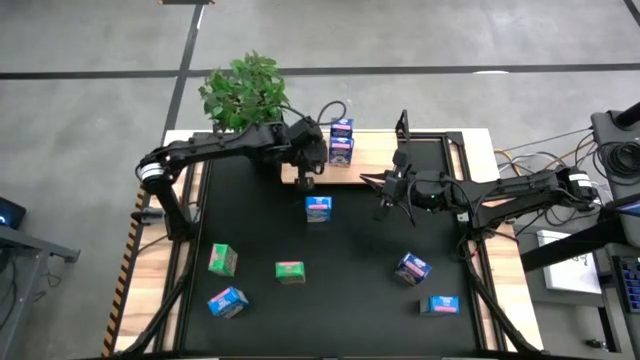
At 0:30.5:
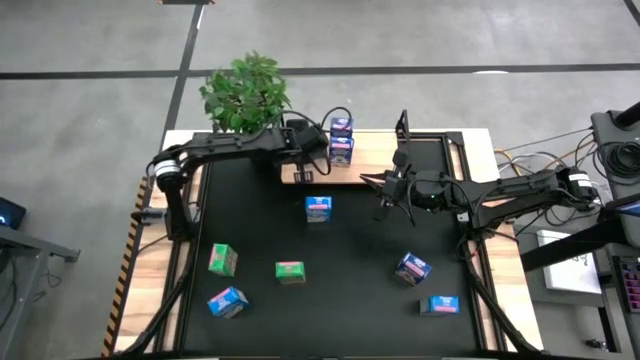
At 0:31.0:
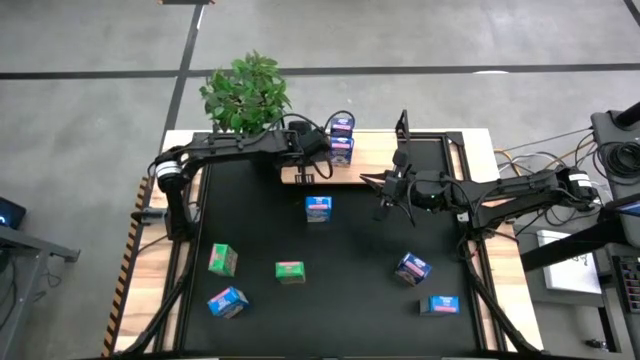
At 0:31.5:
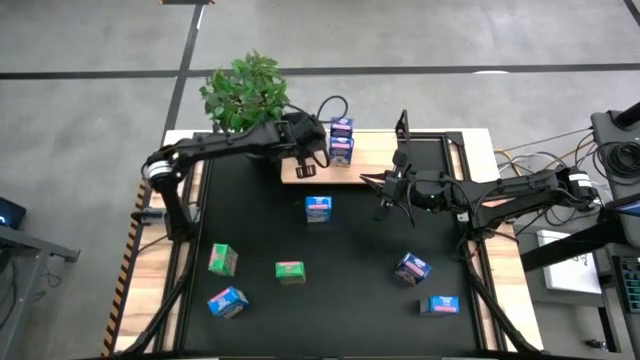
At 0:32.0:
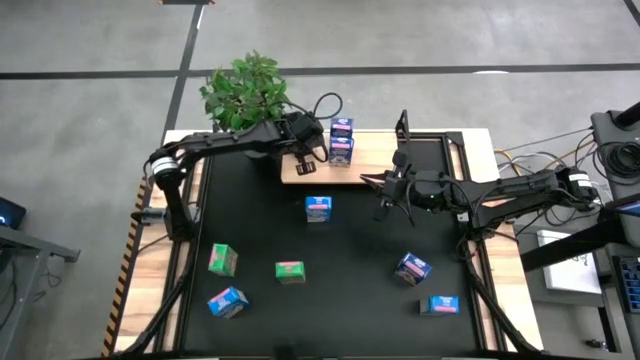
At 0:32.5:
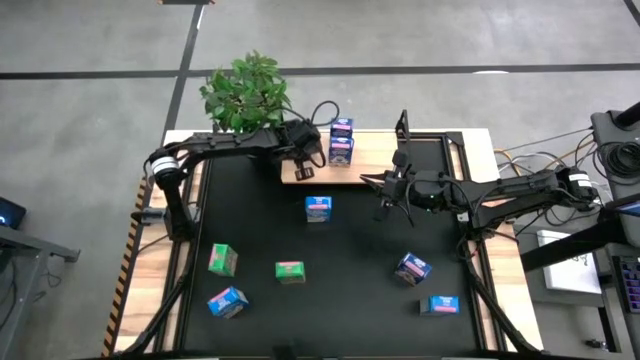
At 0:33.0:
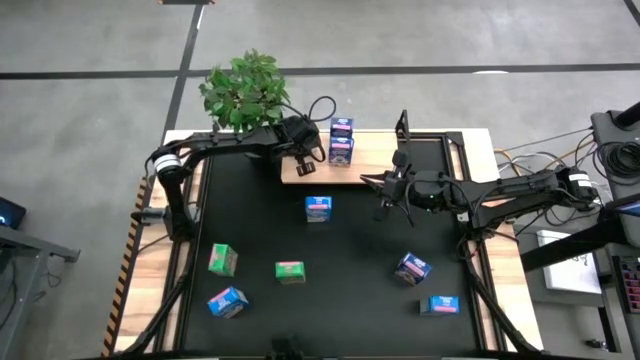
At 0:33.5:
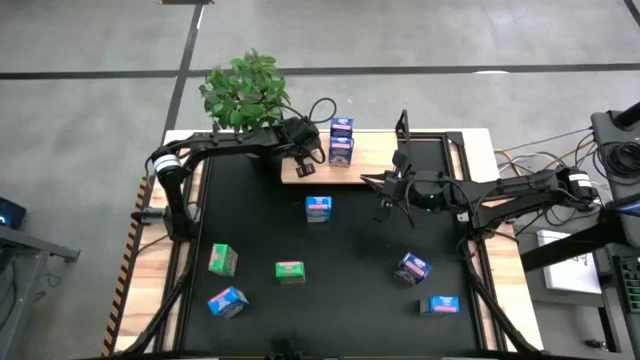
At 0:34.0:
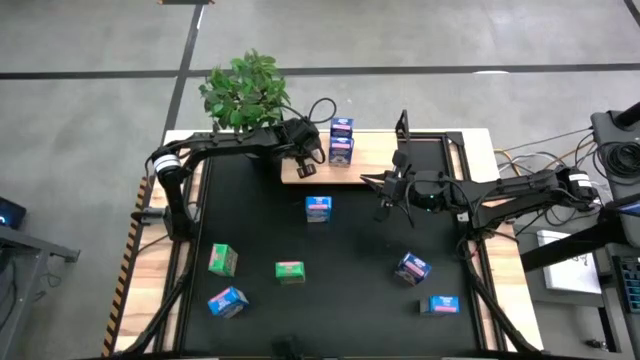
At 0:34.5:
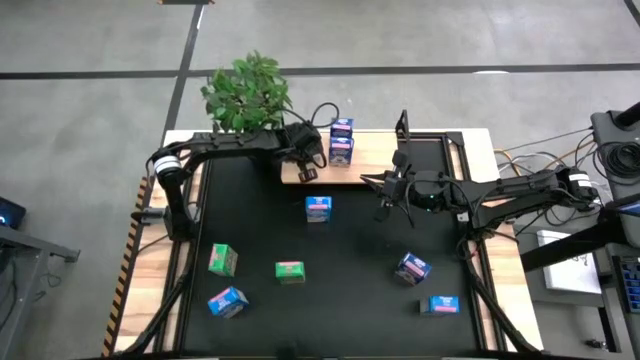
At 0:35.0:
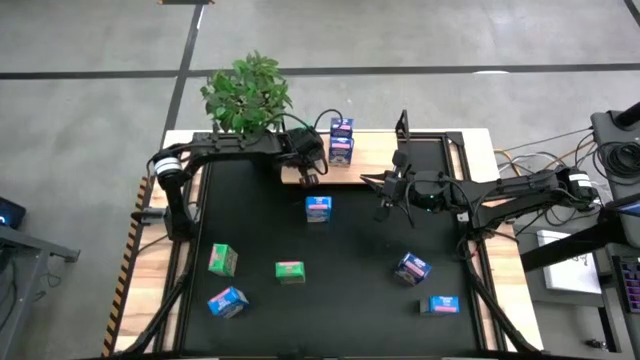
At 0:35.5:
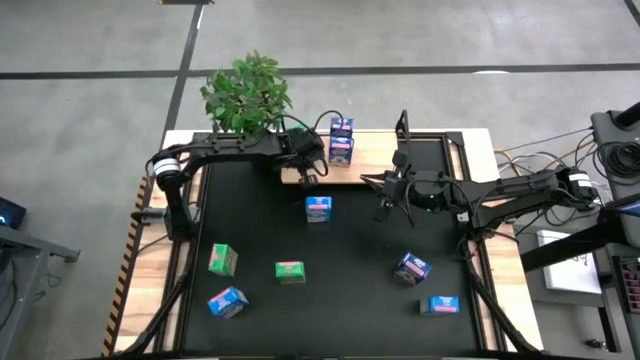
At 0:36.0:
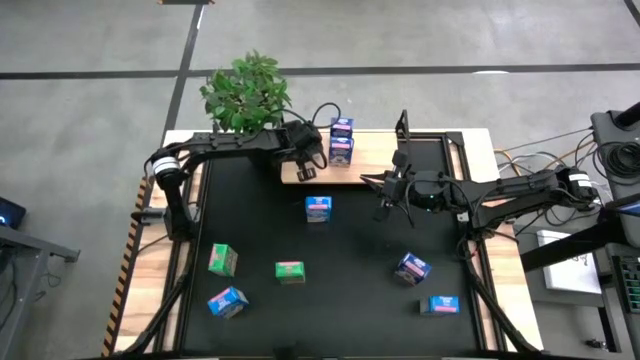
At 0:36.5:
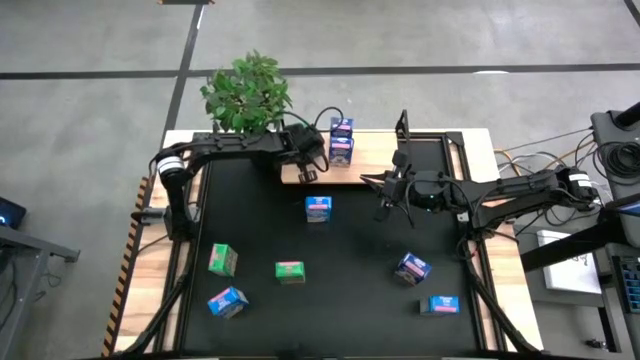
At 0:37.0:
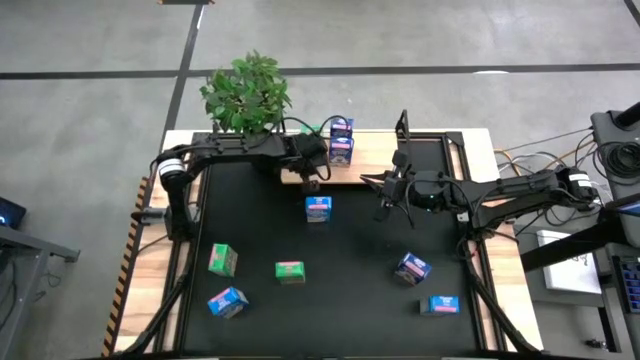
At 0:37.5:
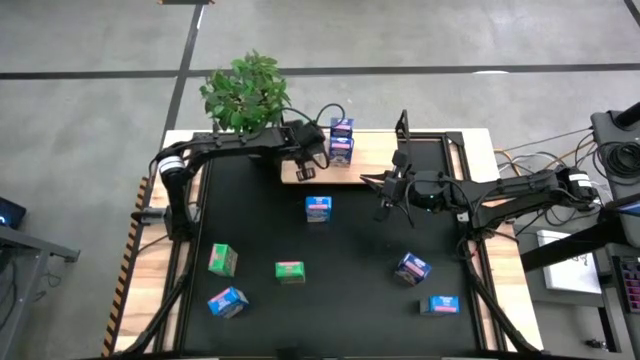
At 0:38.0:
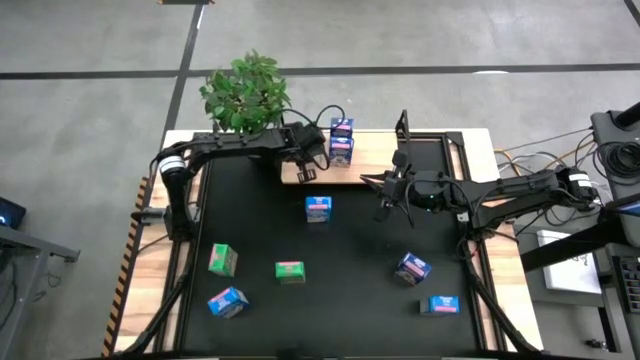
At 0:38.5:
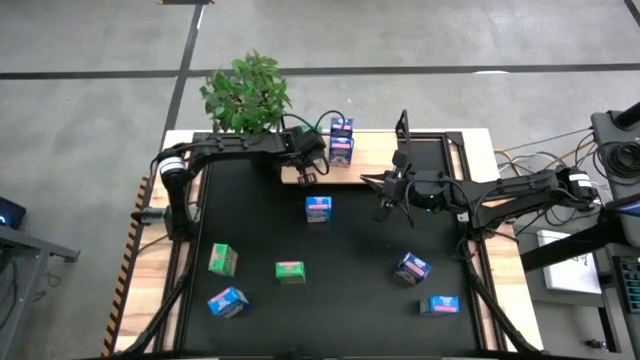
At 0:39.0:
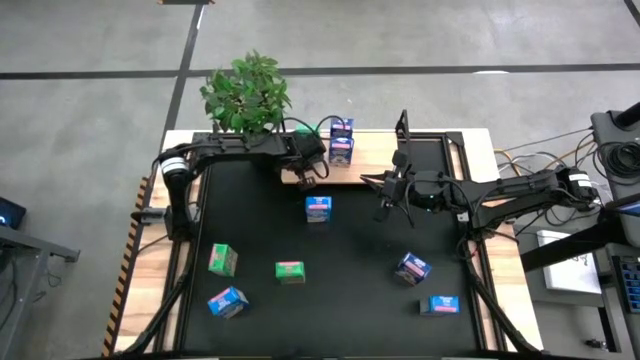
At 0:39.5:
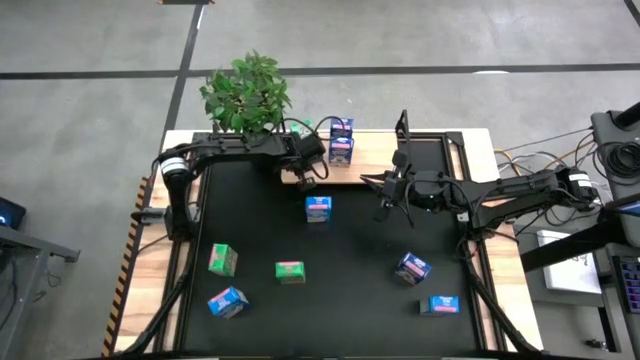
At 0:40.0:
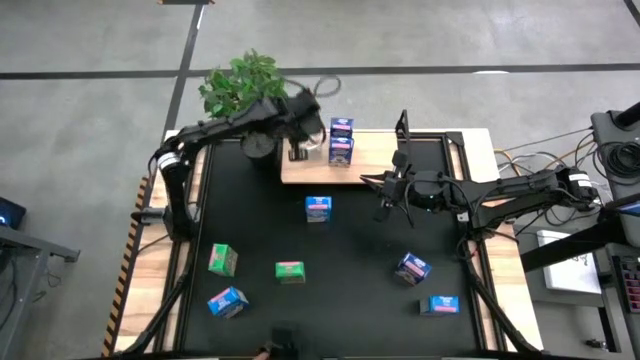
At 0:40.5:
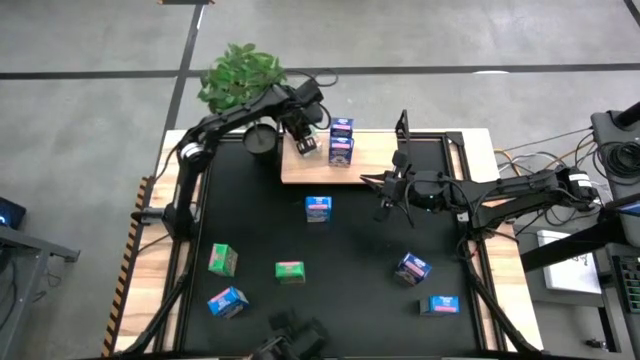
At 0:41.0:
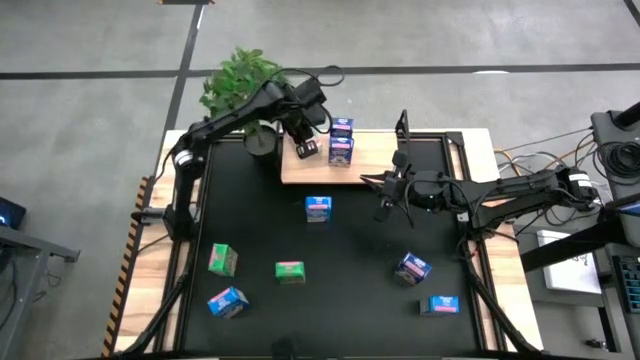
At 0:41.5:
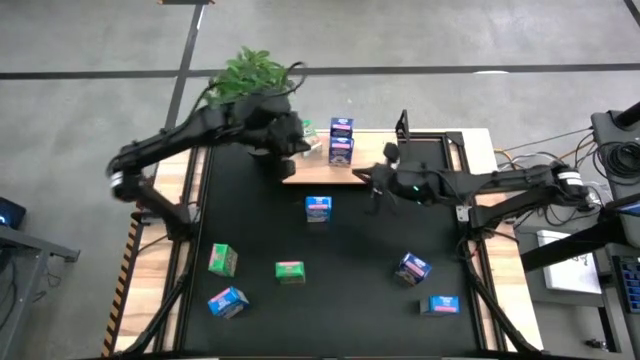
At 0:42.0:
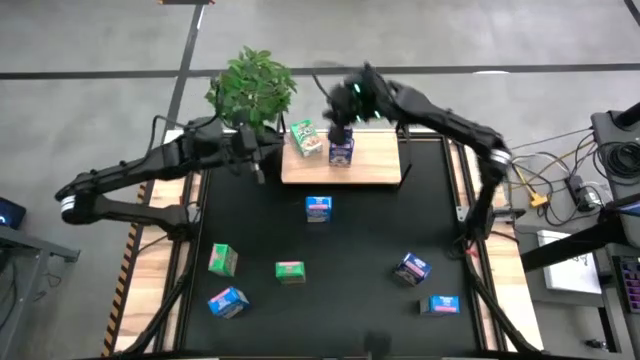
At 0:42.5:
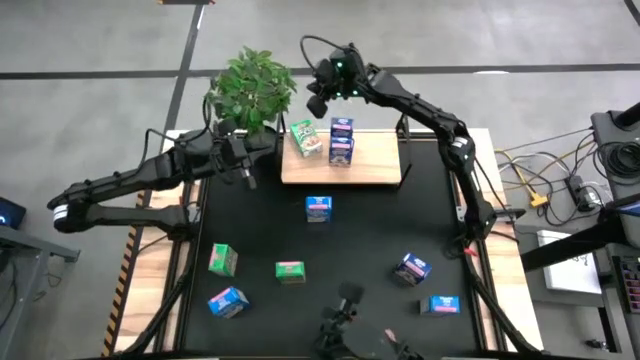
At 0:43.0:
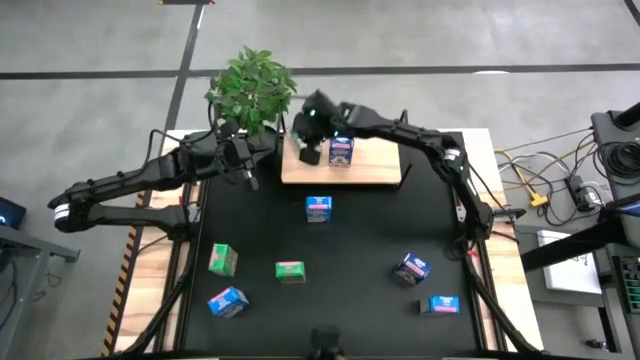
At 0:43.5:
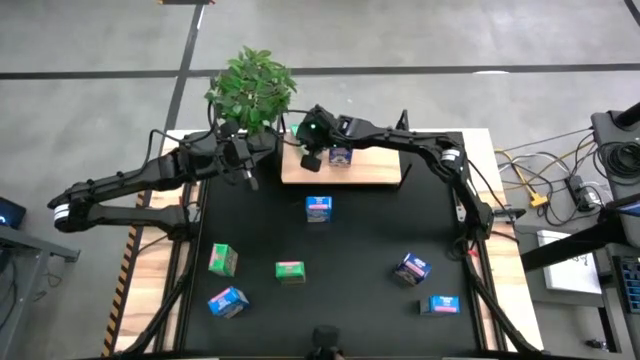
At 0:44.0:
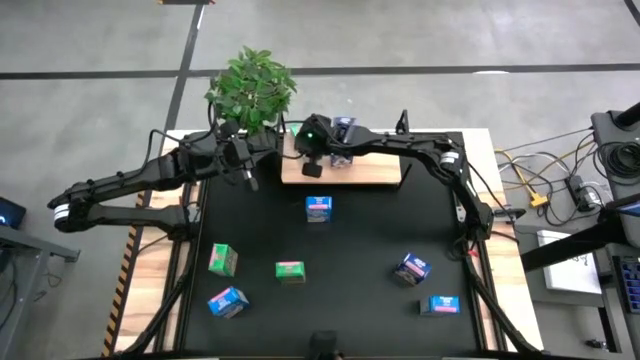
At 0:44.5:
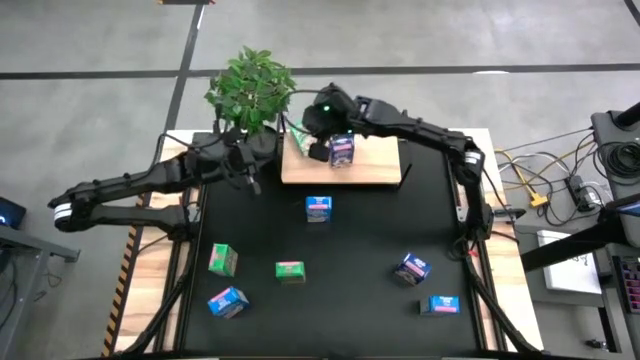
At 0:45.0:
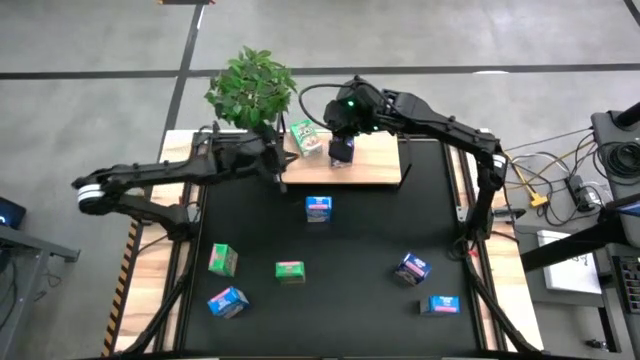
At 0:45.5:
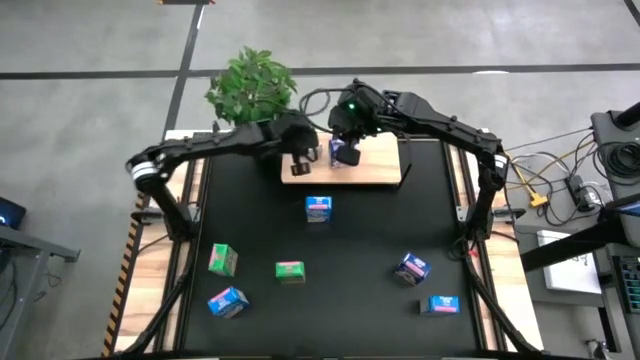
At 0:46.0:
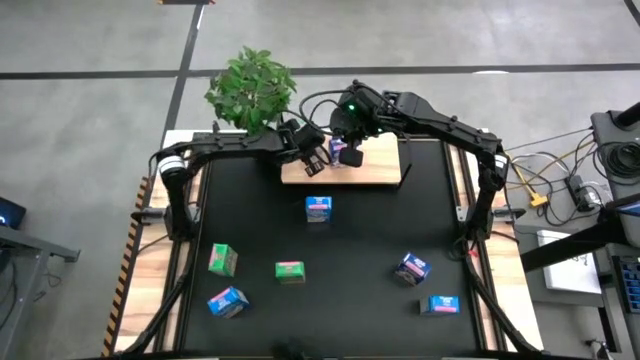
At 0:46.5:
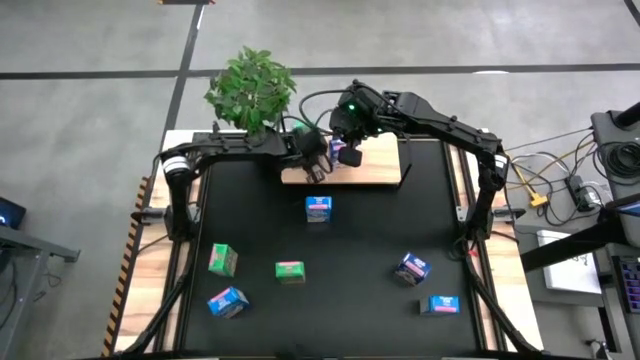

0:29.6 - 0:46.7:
Task: Stack cereal on shelf
Put the top green cereal box on the shelf

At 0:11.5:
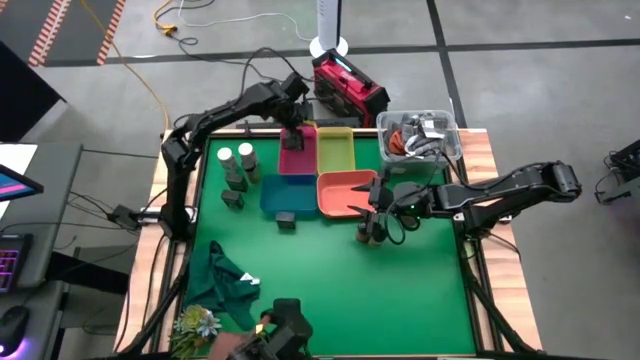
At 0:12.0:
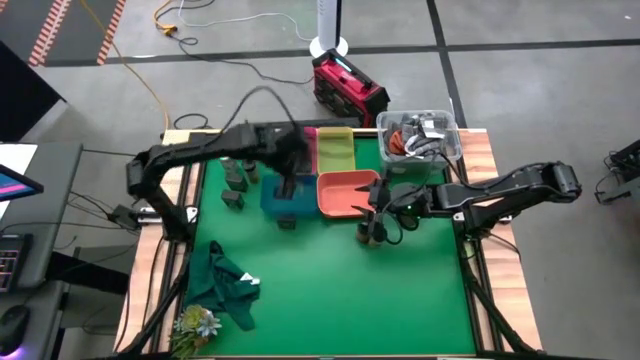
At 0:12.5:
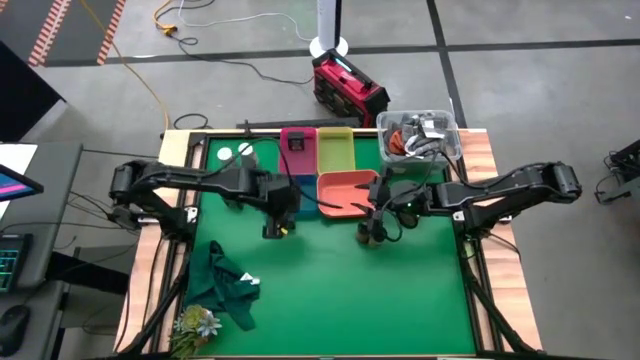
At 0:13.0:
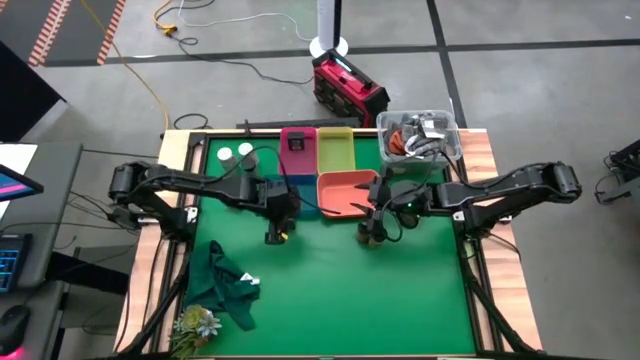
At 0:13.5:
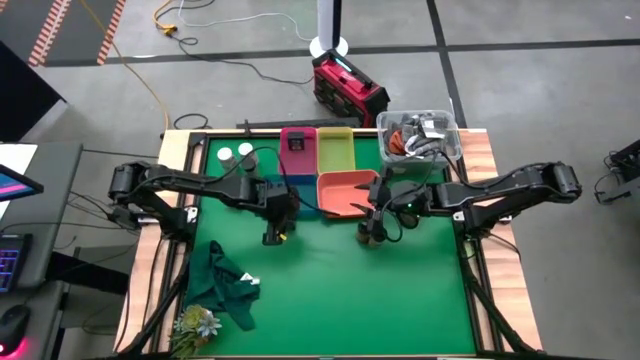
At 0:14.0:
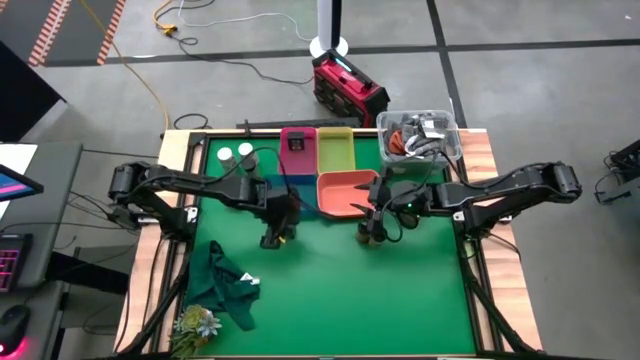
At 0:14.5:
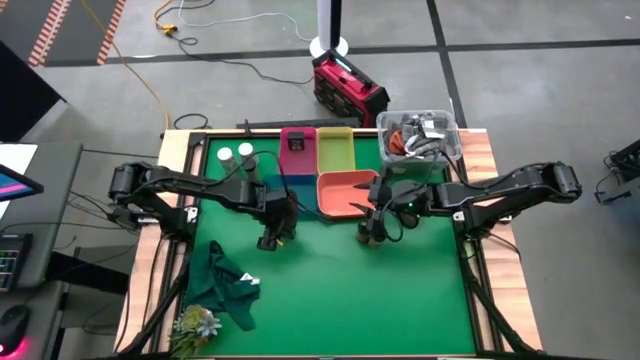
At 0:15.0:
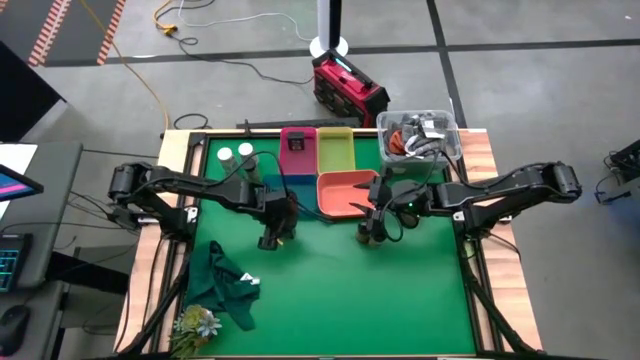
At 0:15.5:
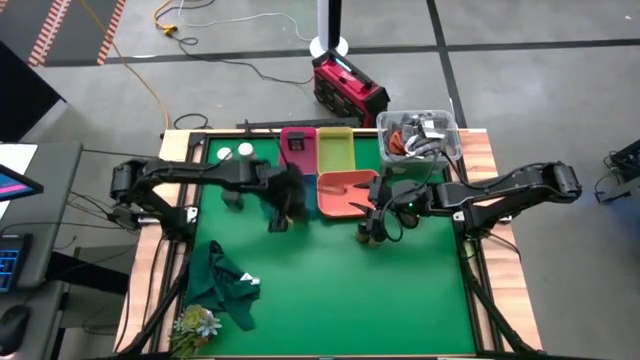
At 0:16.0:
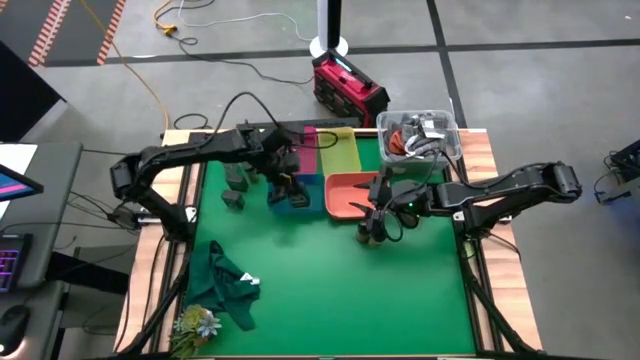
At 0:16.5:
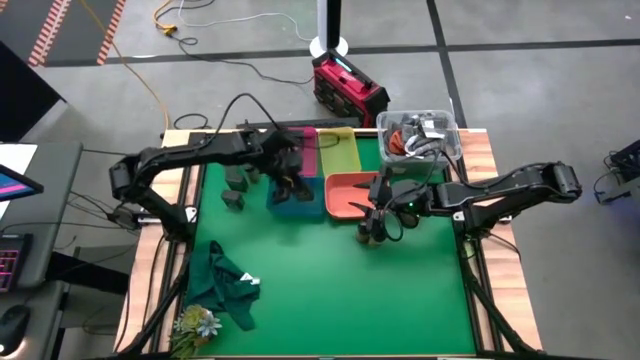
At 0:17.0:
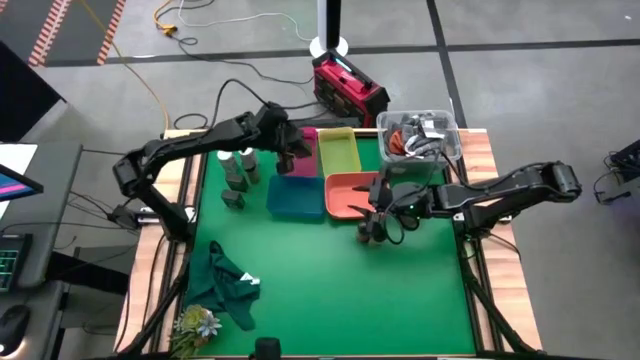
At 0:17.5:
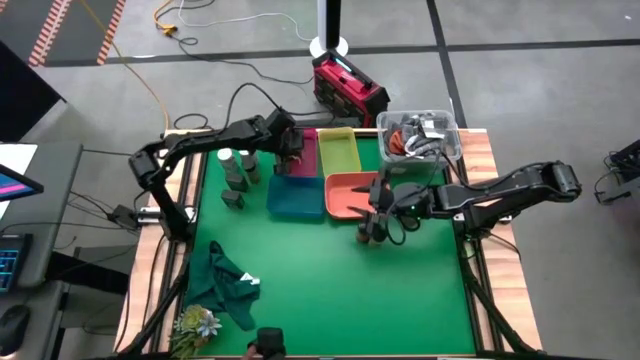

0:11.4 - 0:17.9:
Task: Sort spices by type
Put the bottom black seasoning can into the red bin
